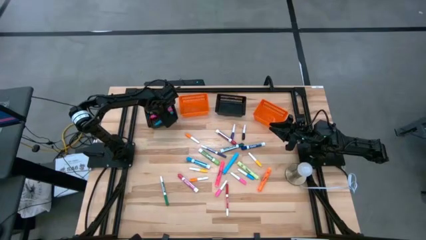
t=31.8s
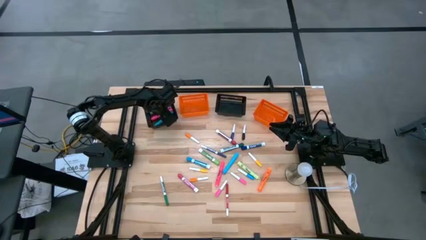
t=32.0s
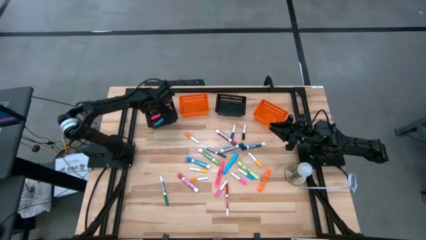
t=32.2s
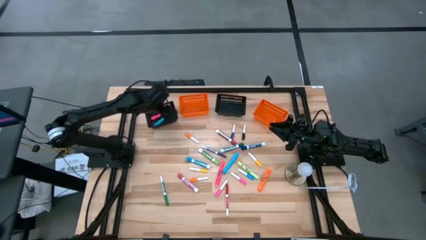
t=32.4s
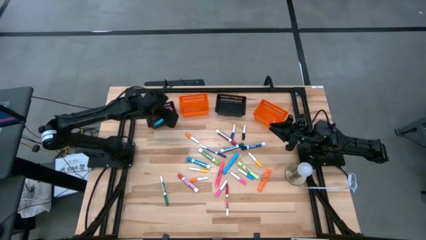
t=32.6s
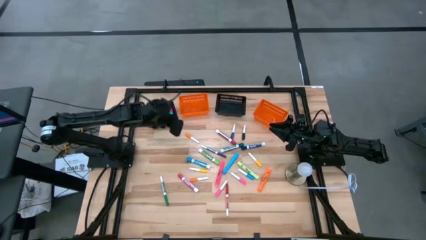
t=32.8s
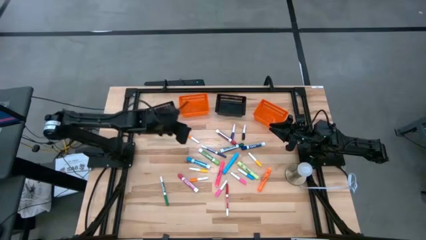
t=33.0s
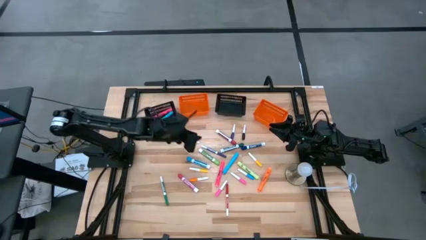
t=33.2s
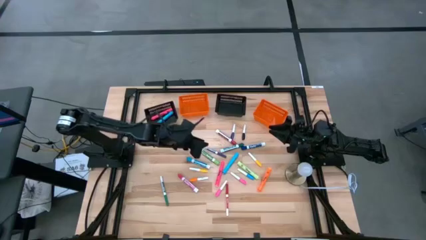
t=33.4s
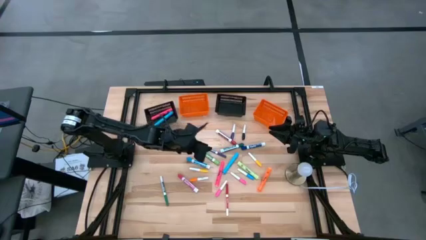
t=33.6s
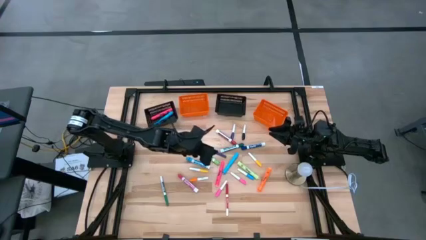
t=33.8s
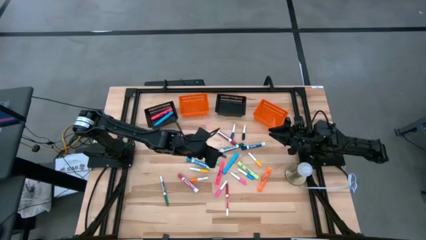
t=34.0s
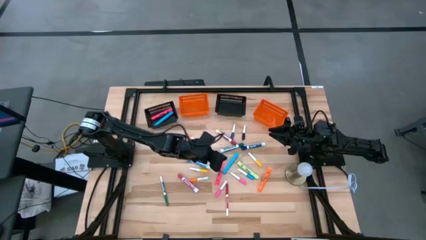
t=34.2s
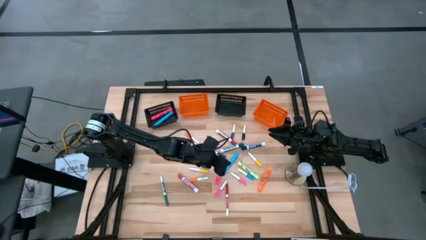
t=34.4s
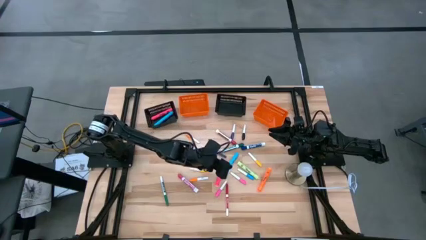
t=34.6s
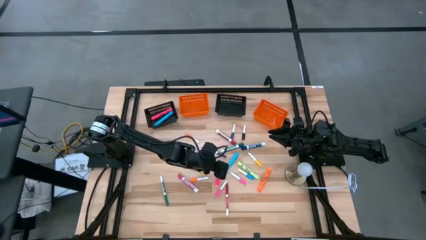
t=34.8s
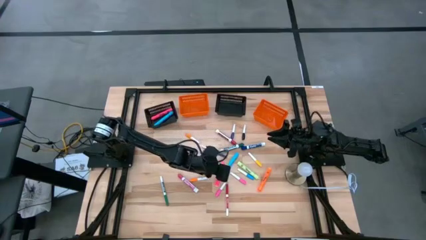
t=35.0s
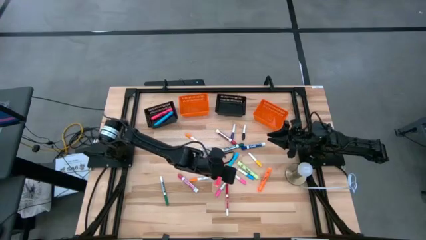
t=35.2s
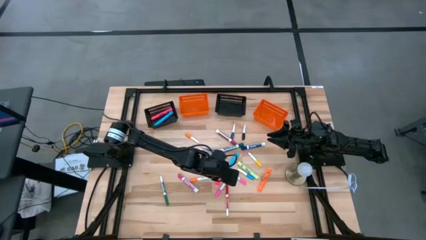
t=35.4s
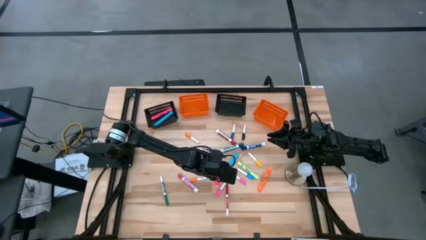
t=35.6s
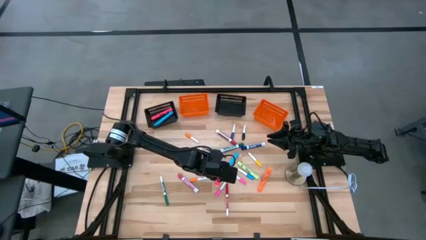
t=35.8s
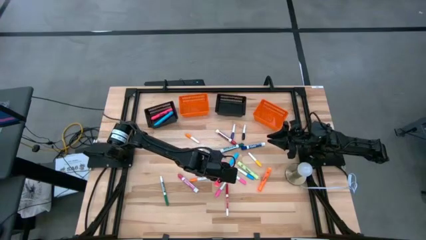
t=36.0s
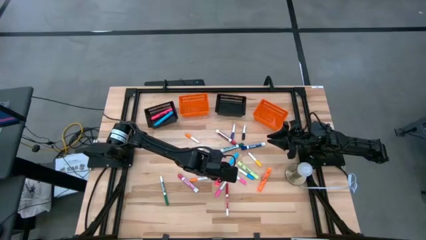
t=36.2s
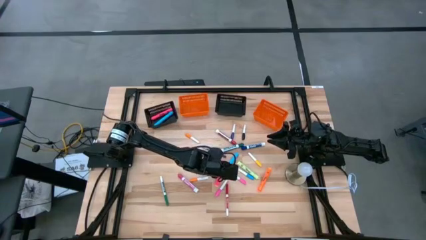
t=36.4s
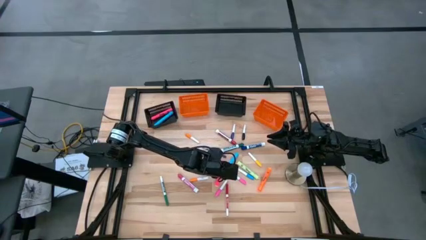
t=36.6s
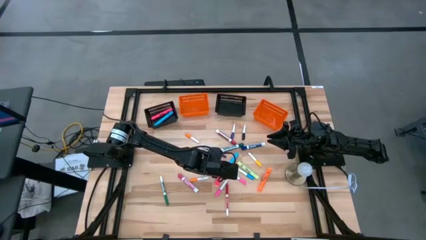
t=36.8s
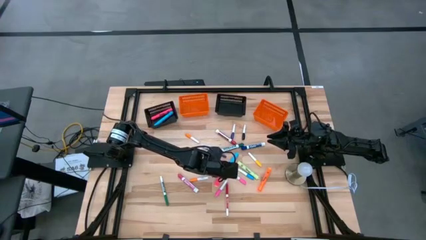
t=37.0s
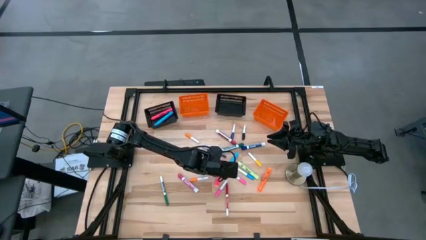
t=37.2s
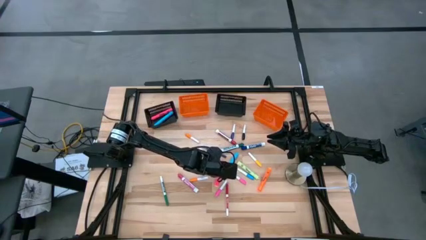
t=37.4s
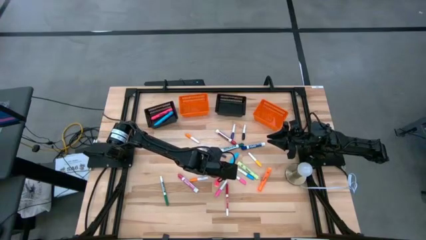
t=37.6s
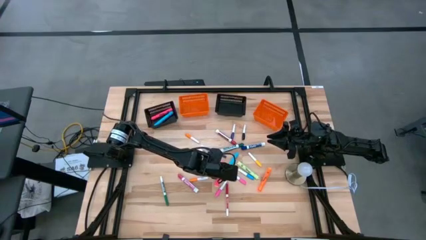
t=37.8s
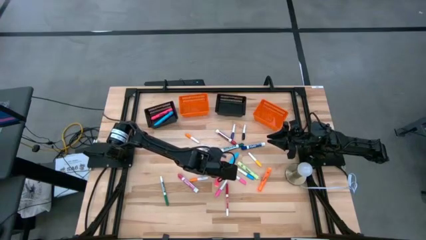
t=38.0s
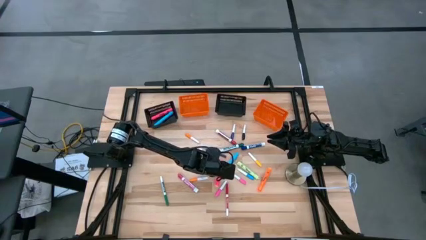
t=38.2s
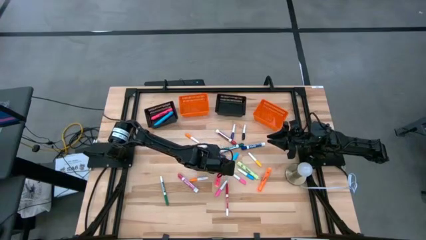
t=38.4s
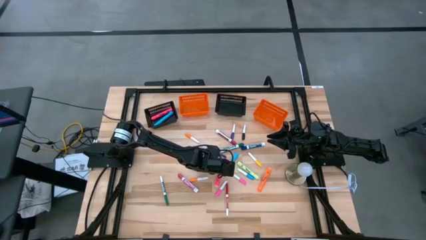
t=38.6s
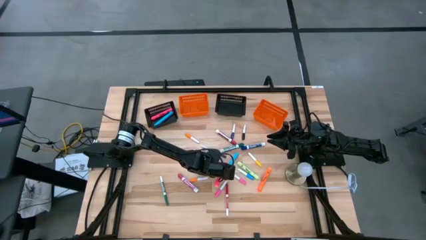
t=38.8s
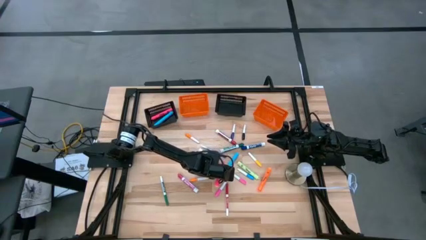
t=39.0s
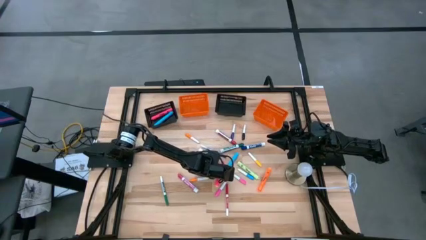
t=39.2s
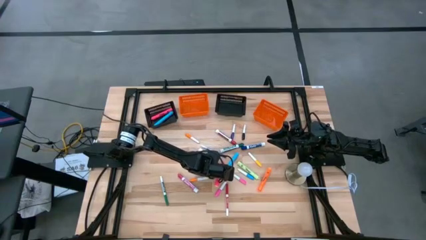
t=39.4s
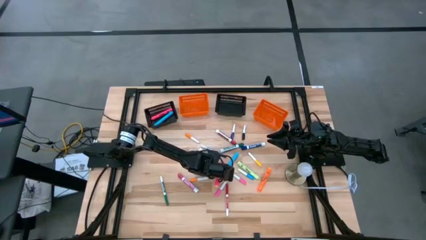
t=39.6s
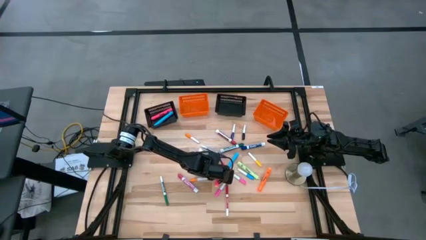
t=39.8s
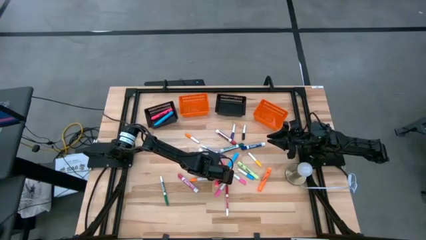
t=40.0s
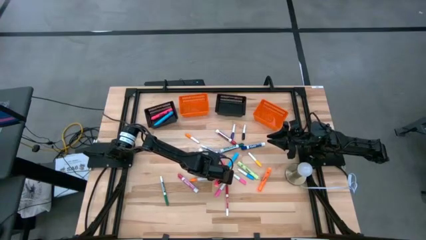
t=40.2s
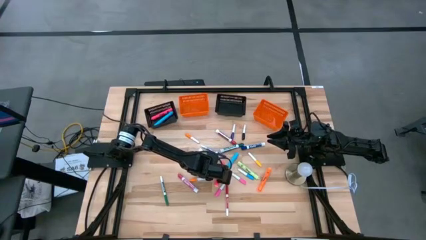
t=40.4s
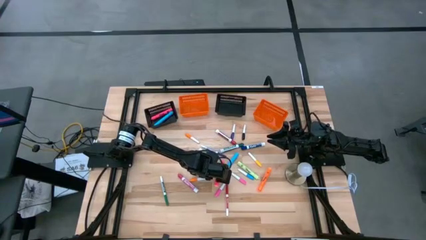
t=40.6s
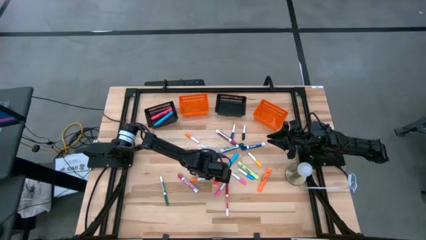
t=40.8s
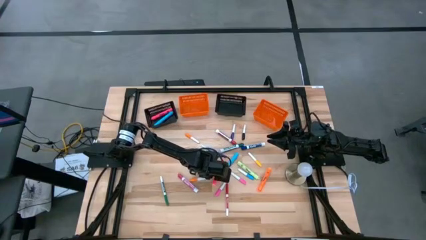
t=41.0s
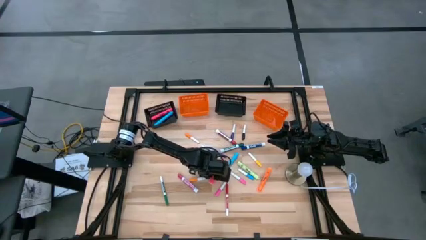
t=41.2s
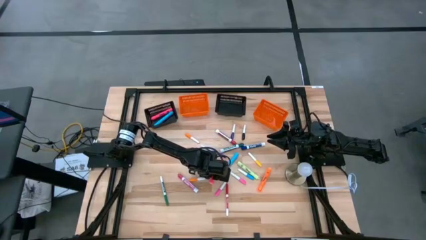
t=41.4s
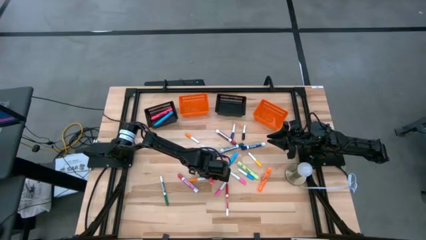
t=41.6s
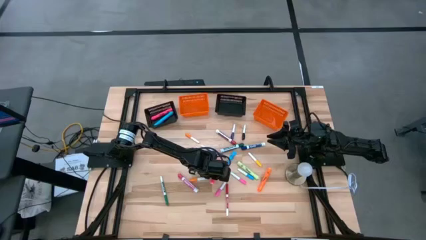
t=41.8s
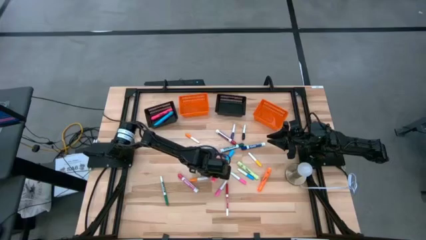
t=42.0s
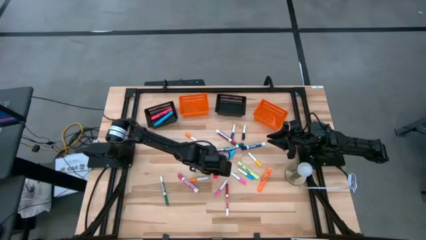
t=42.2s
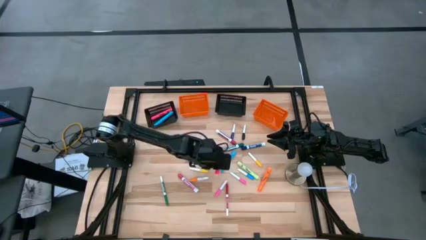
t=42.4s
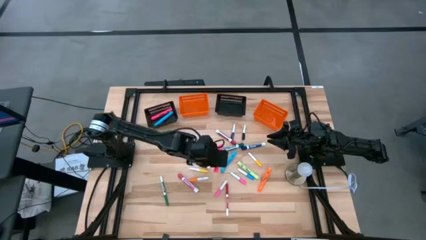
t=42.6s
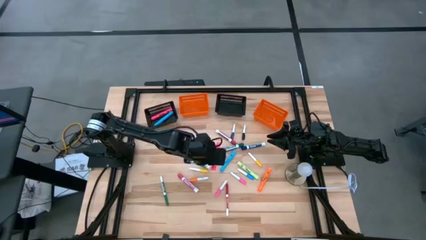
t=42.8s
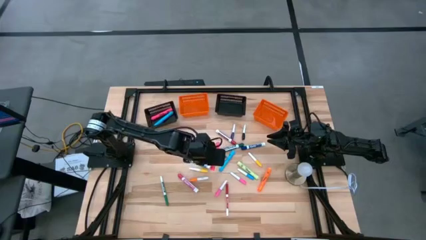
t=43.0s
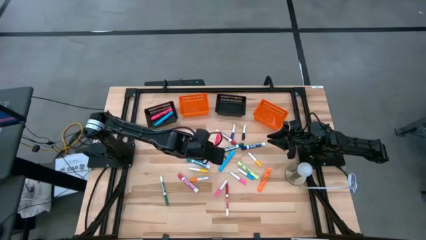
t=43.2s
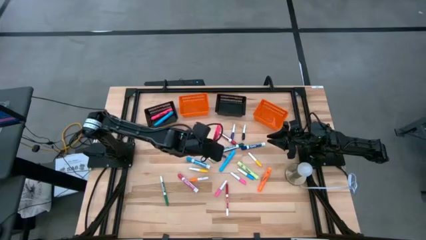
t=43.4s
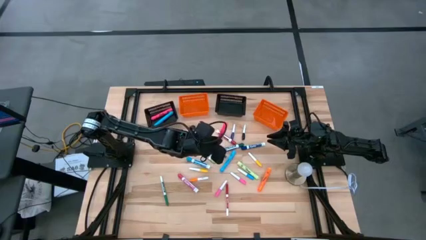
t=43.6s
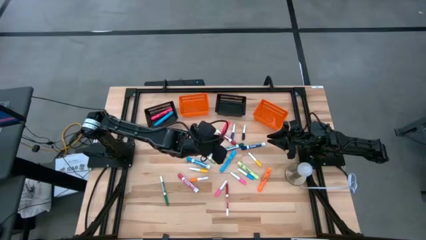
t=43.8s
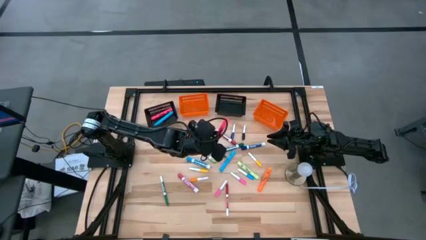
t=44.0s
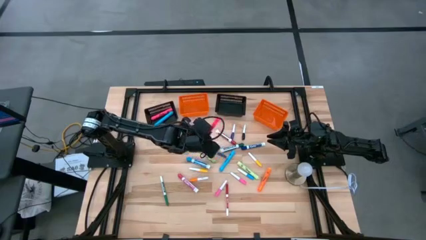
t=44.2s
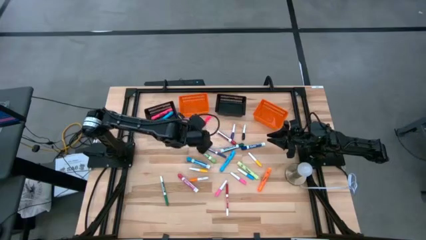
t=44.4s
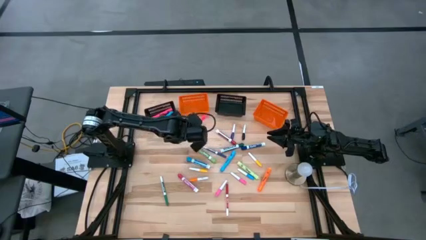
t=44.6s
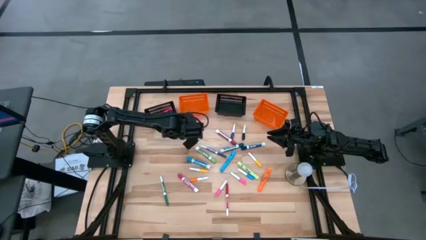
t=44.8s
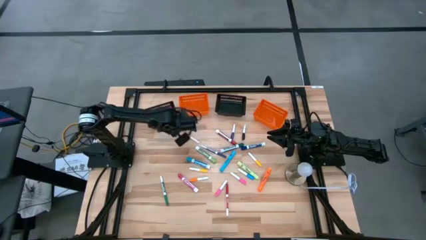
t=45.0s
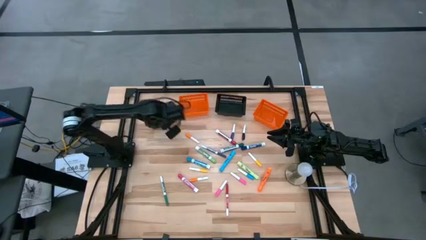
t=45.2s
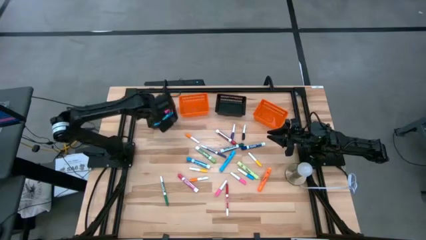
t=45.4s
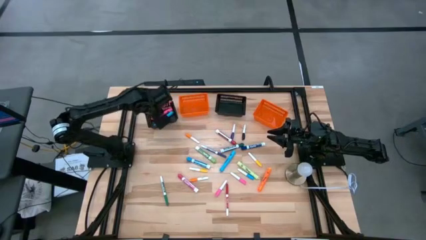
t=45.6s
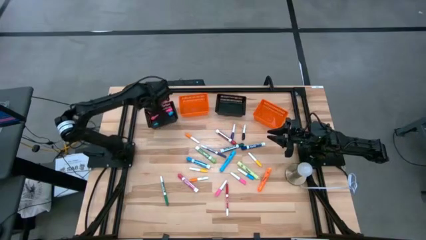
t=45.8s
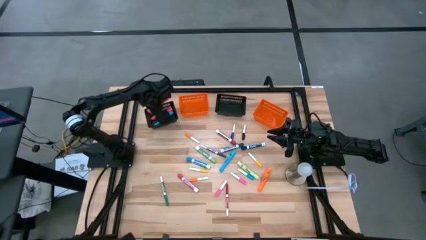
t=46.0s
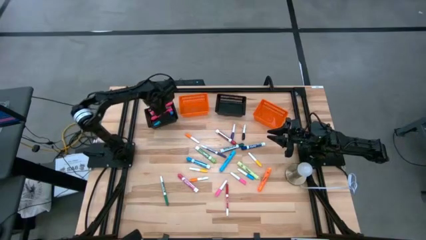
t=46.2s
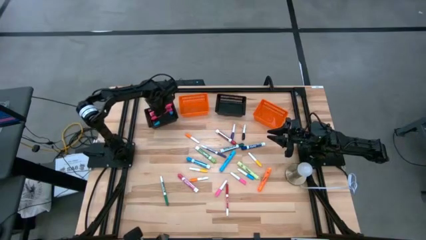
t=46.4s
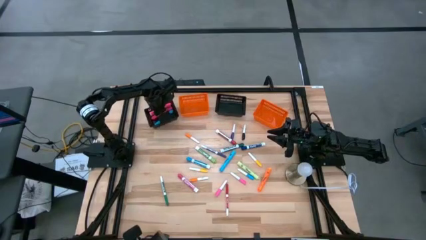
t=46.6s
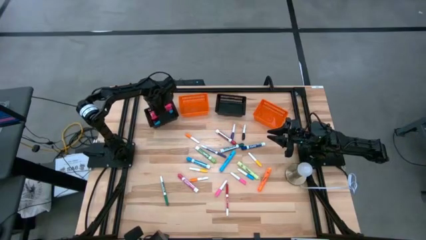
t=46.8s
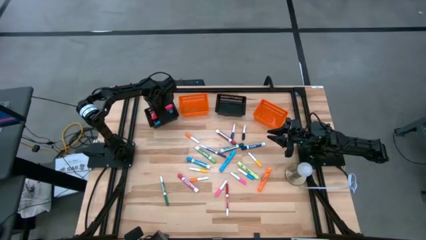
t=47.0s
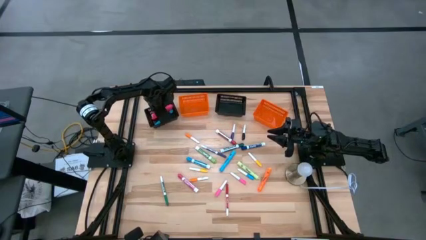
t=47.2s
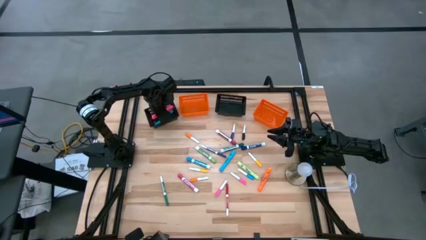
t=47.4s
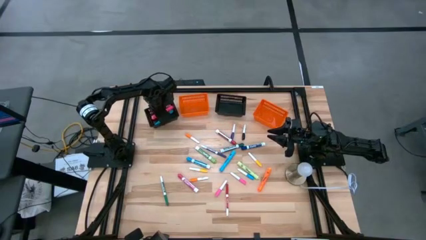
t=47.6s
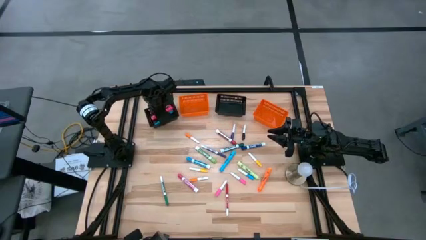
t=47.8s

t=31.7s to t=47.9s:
Task: Pick & Place Markers
Put the pink highlighter pen into the left black bin
